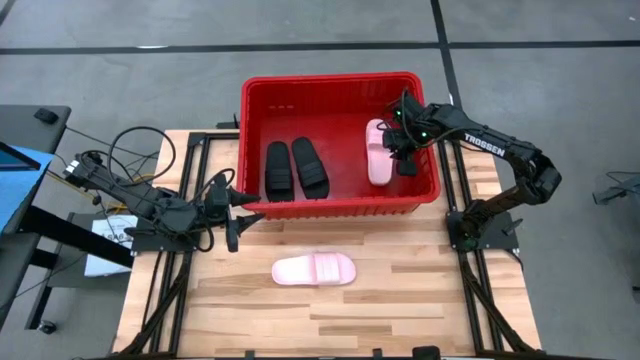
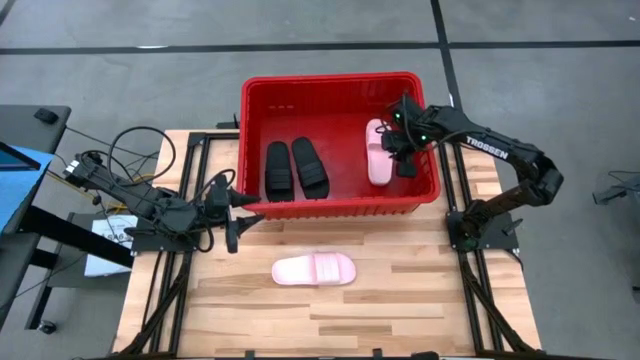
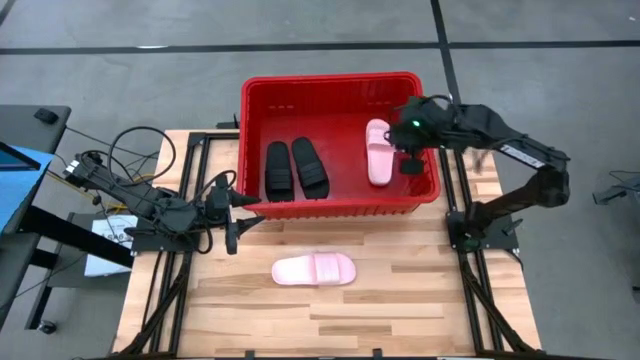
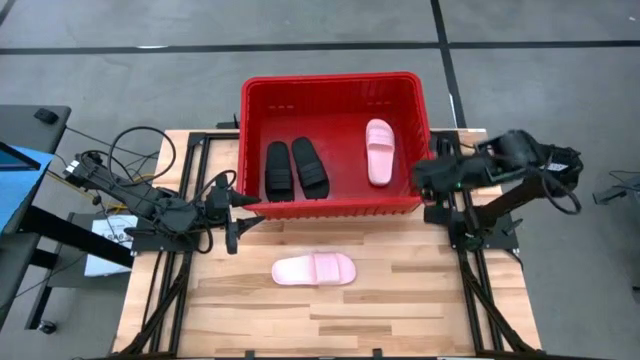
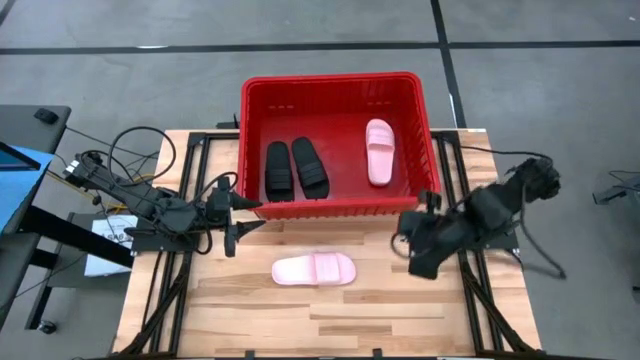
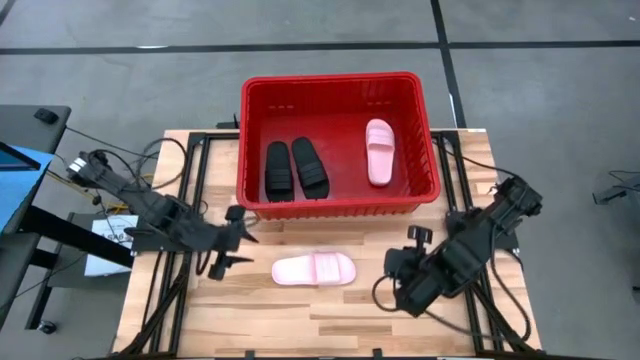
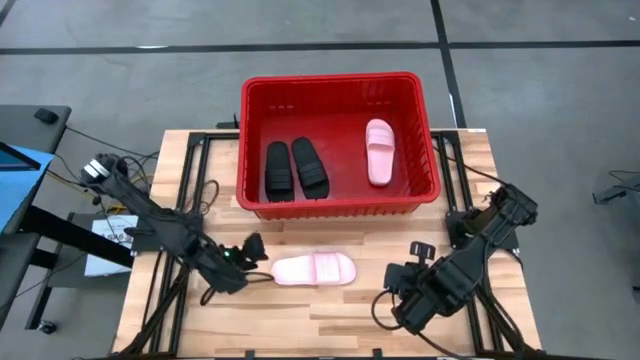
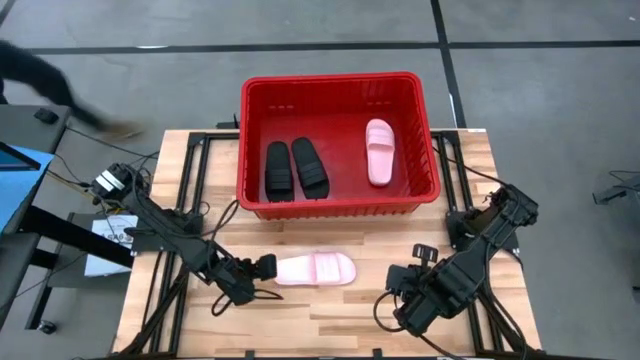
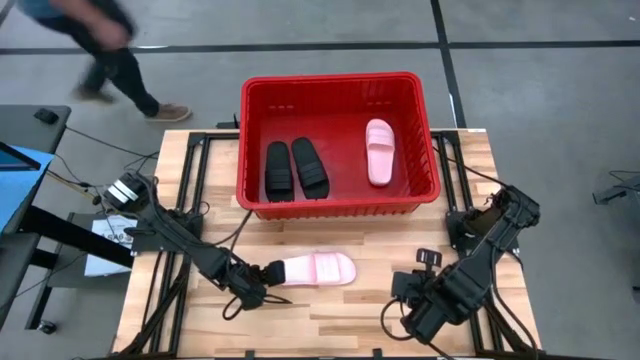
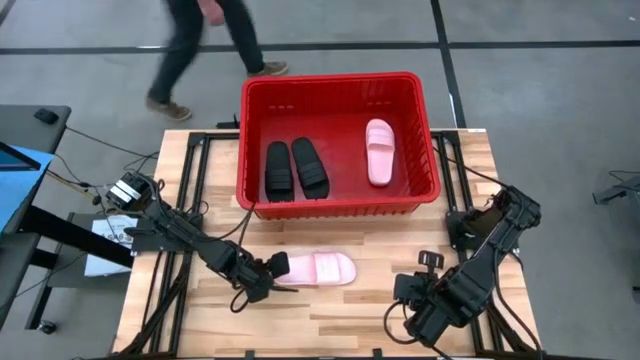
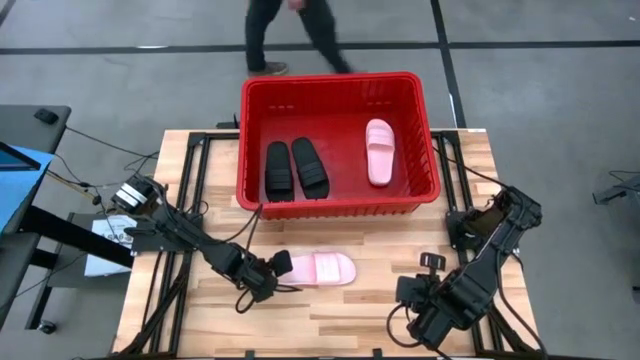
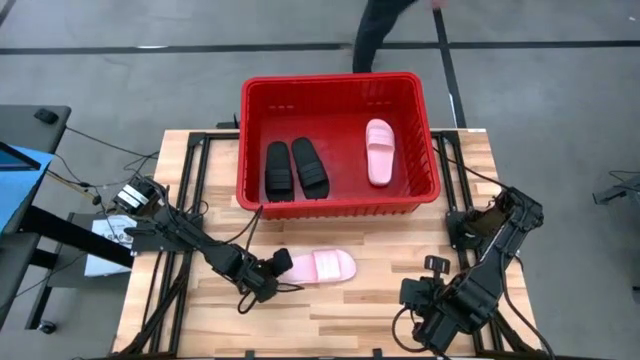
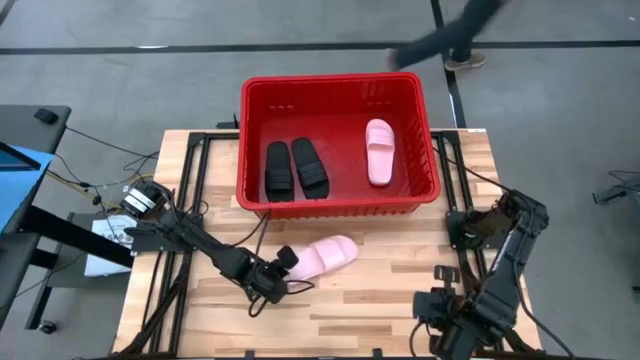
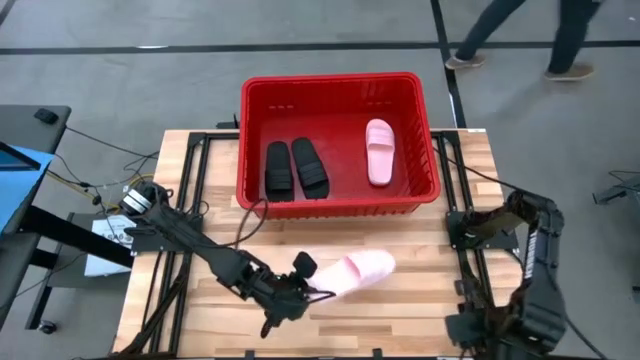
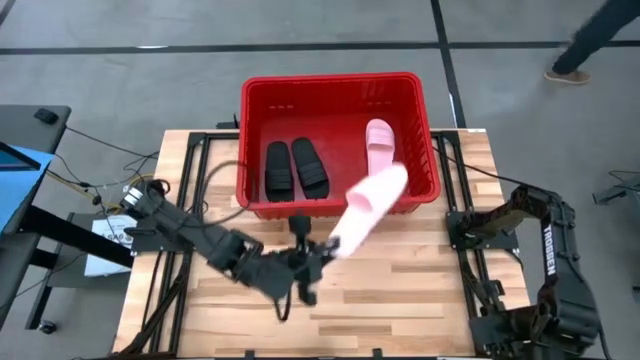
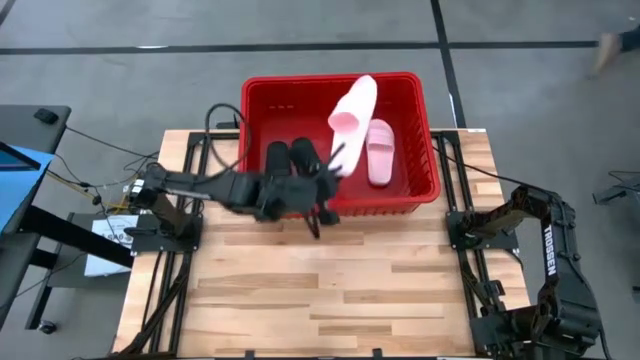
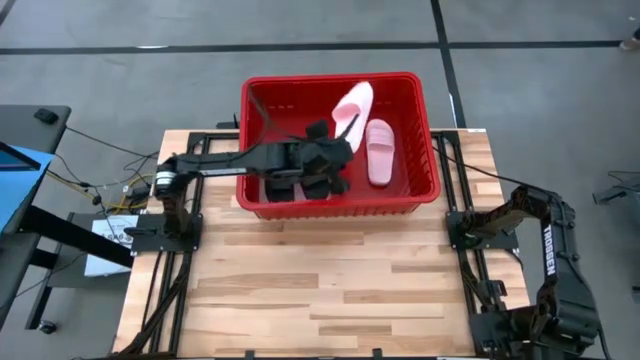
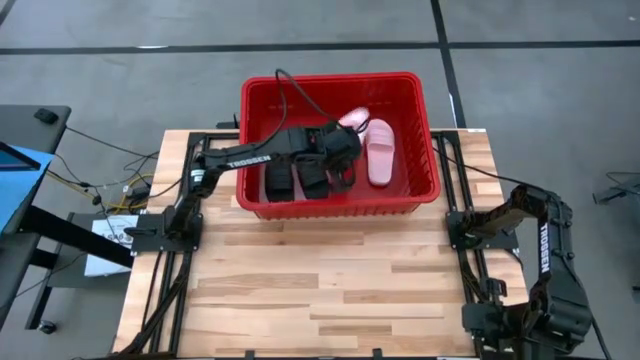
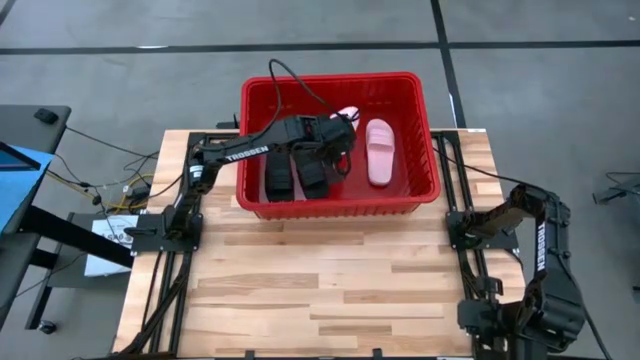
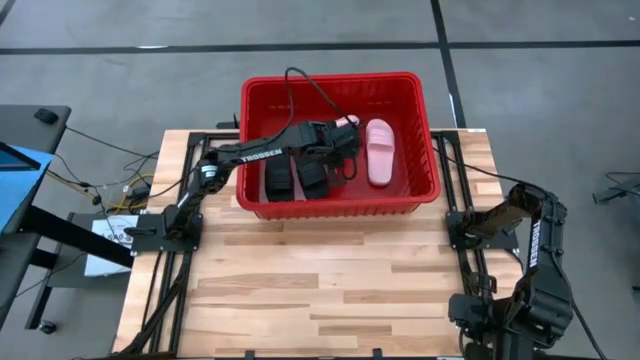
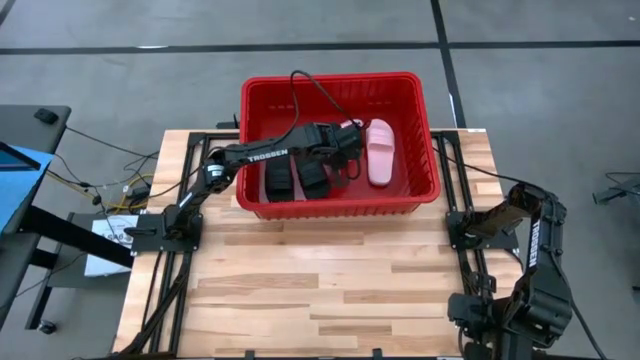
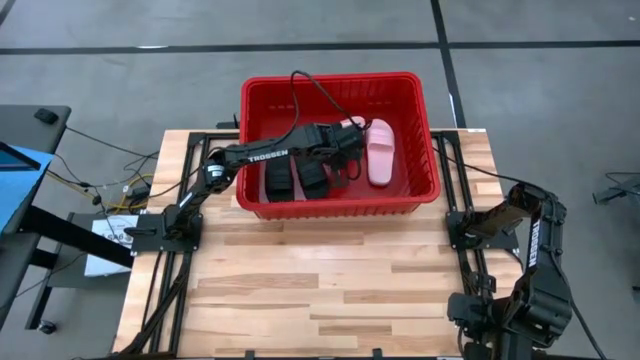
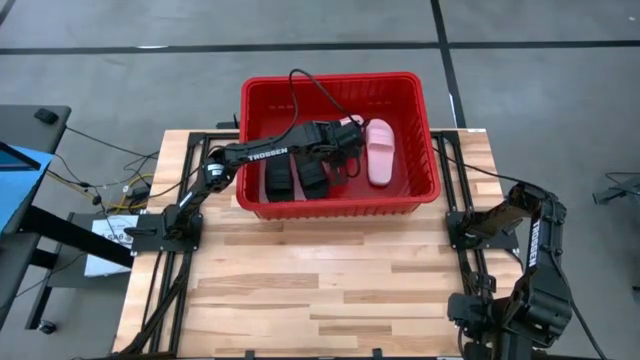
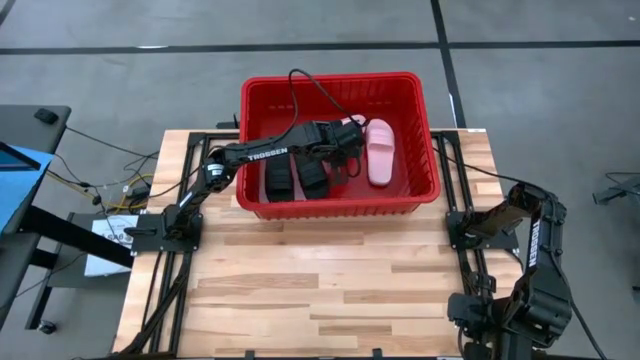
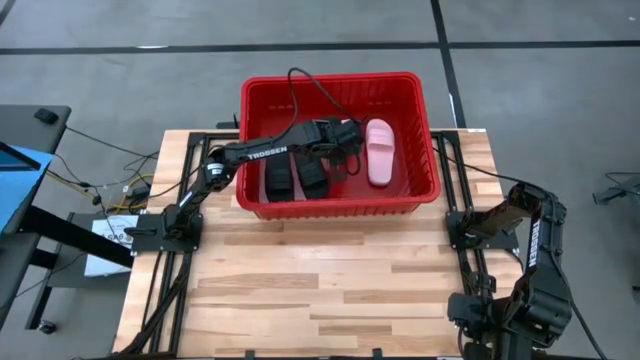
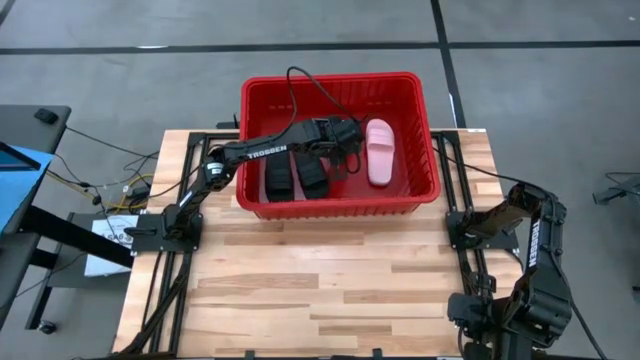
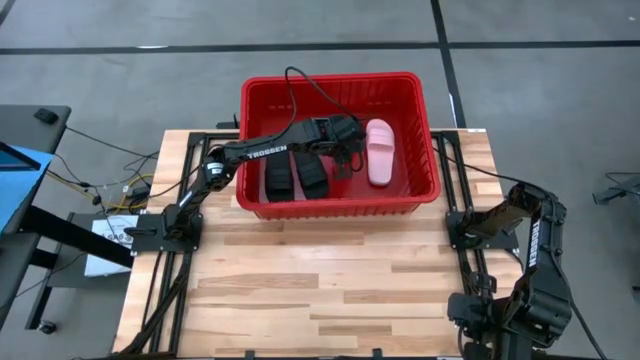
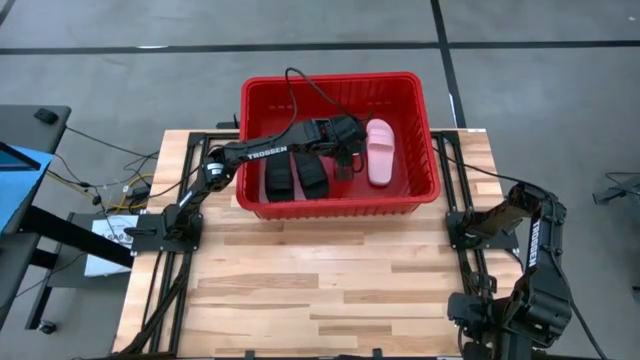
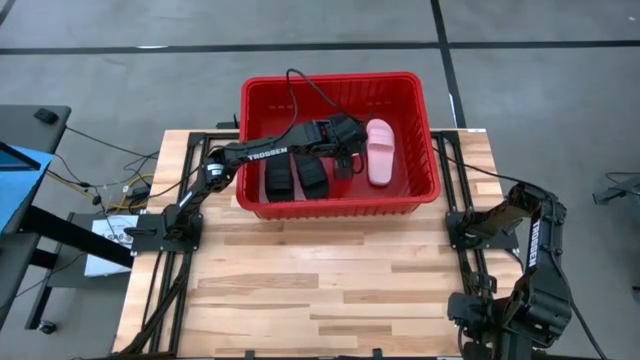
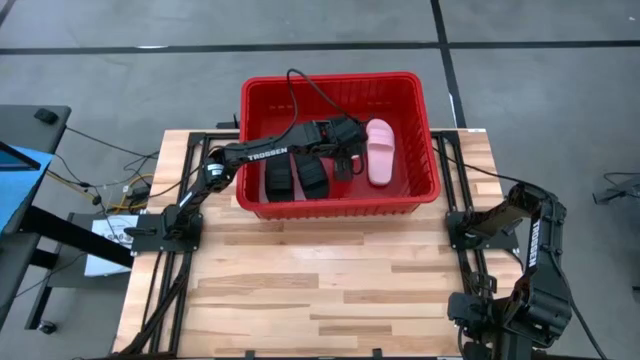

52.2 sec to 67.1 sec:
Task: Pick and place slides into bin
Put the pink slide into the red container

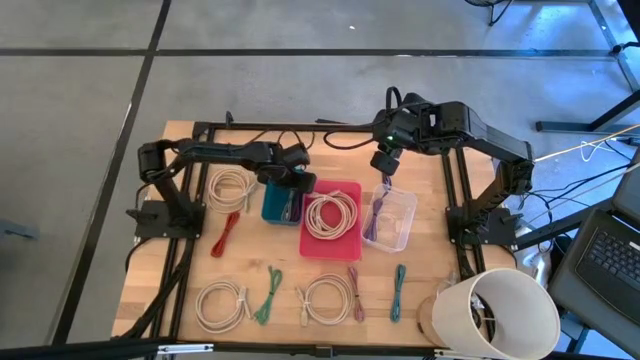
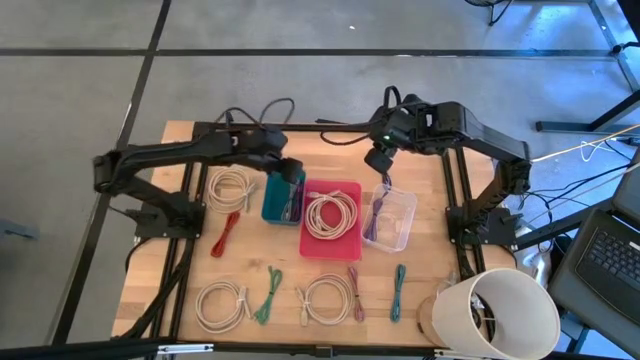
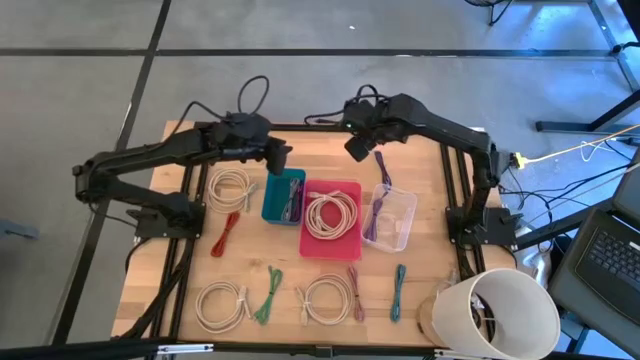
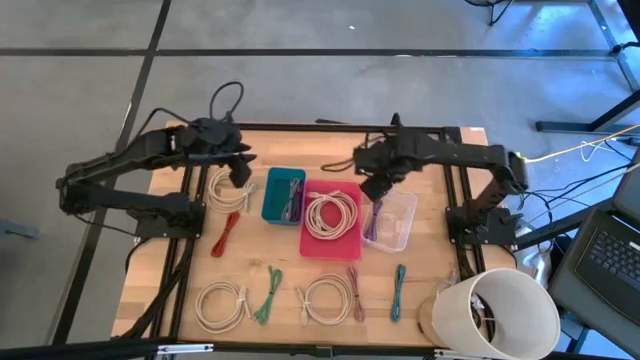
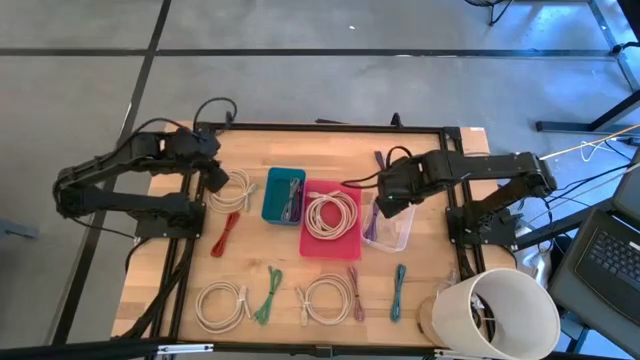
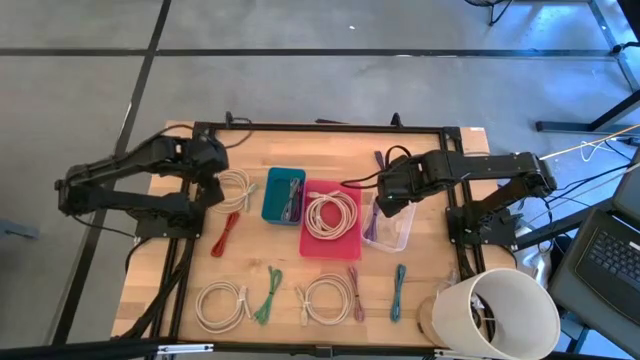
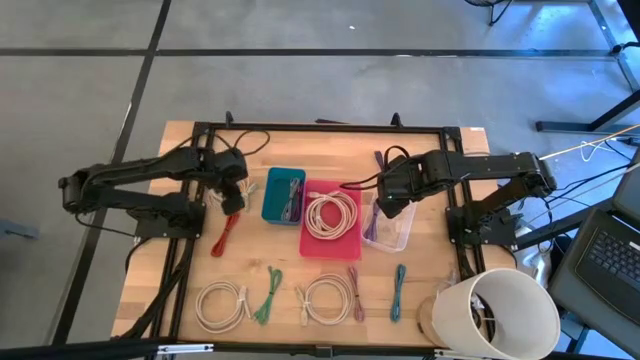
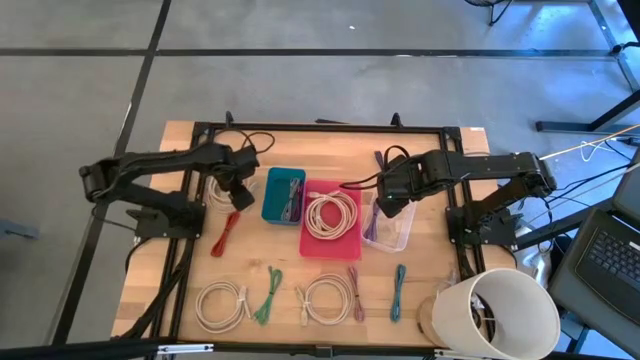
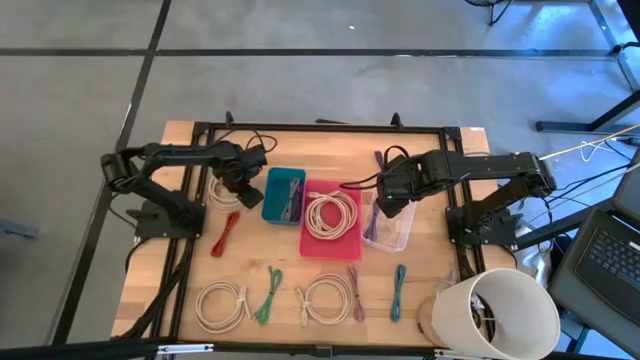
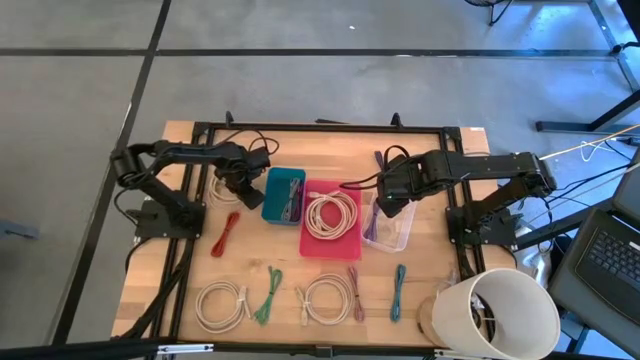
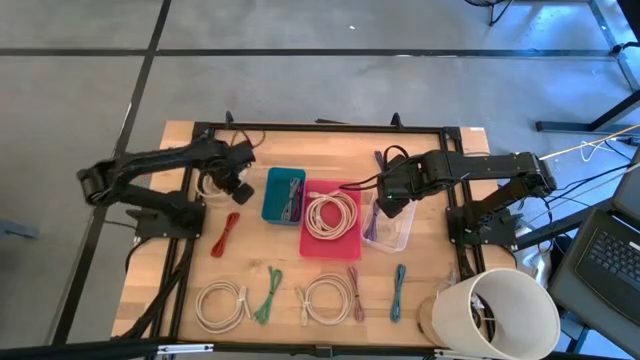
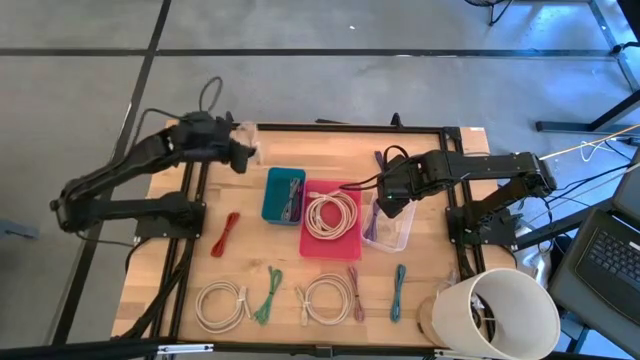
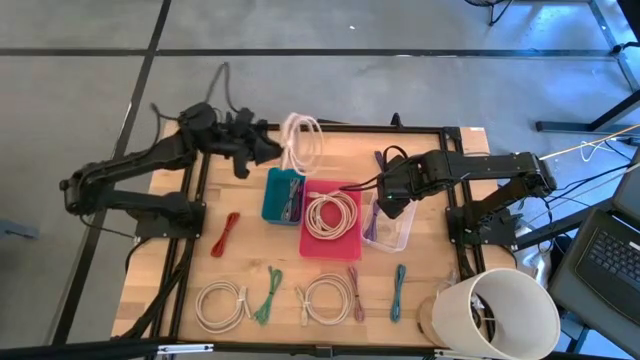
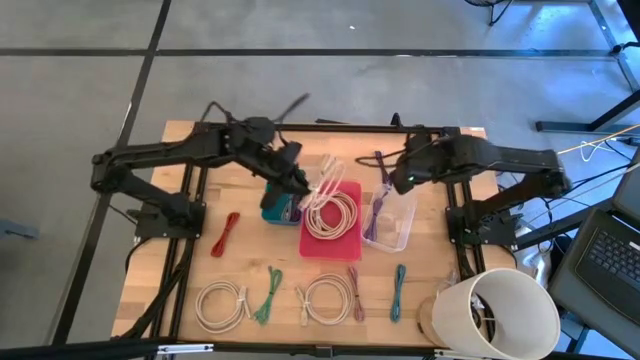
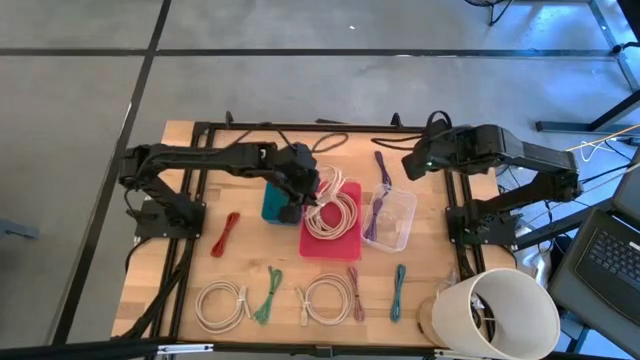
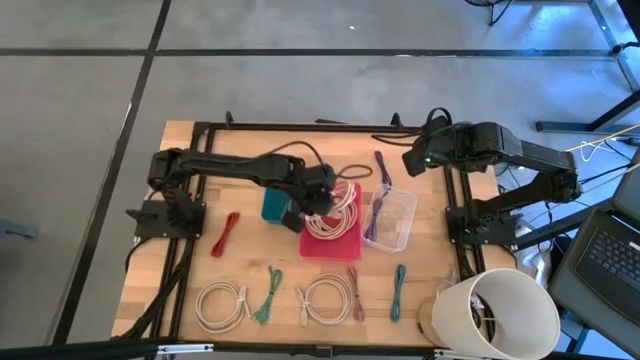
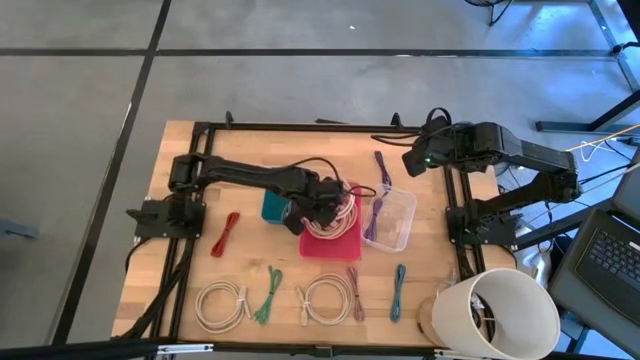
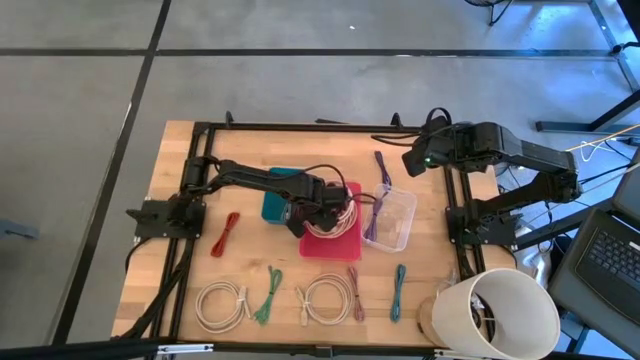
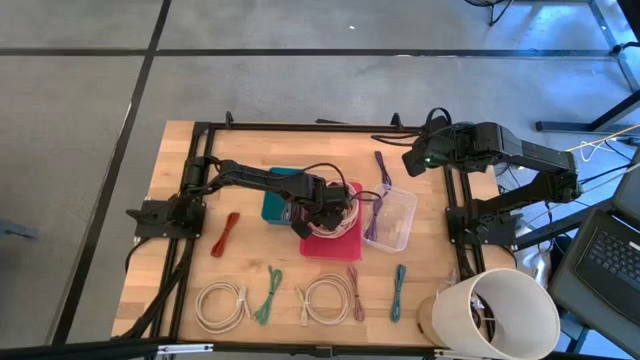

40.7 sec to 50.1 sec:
Task: Pick & Place USB Port
Put the white charger cable into the pink bin
